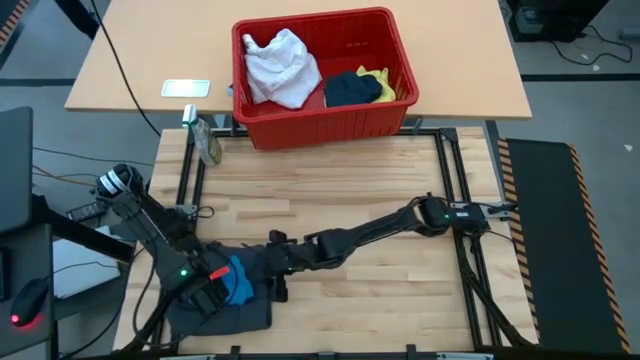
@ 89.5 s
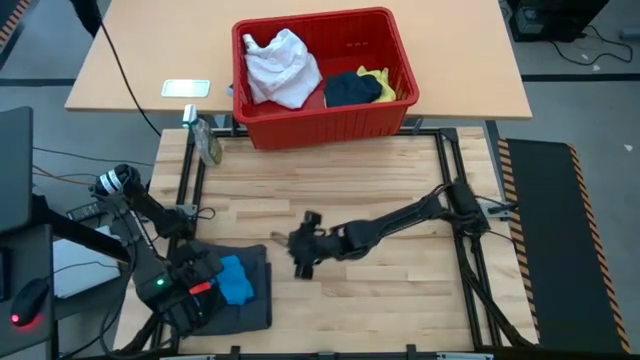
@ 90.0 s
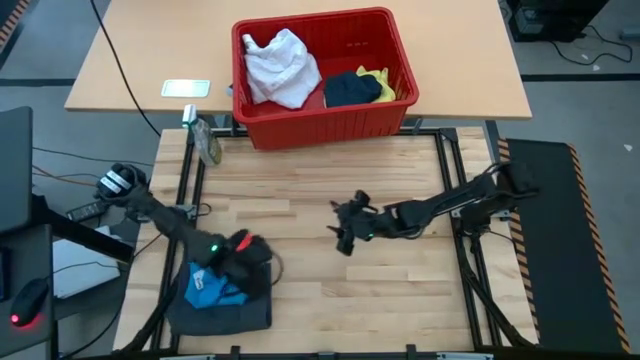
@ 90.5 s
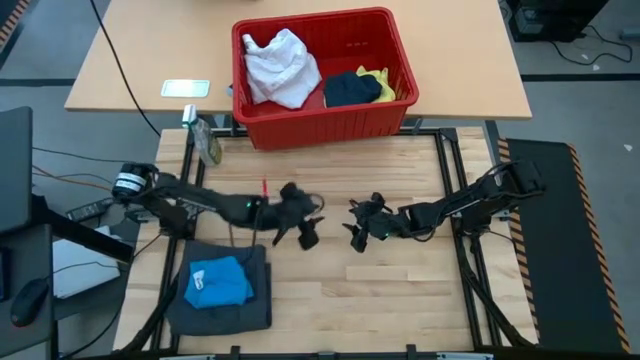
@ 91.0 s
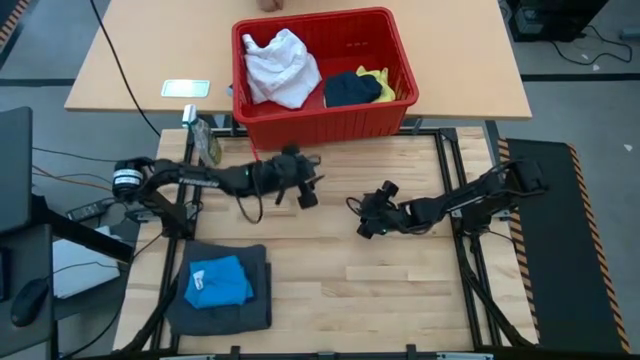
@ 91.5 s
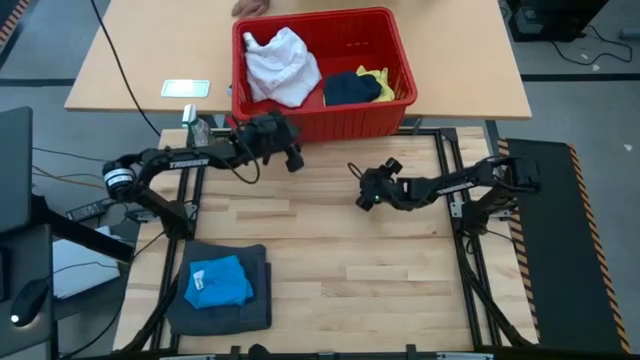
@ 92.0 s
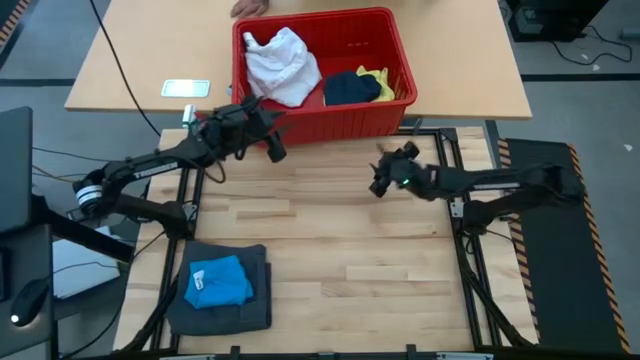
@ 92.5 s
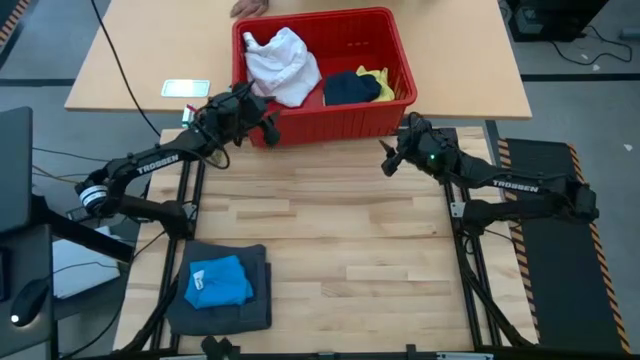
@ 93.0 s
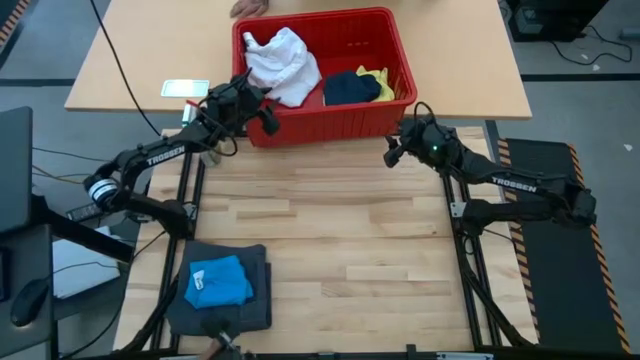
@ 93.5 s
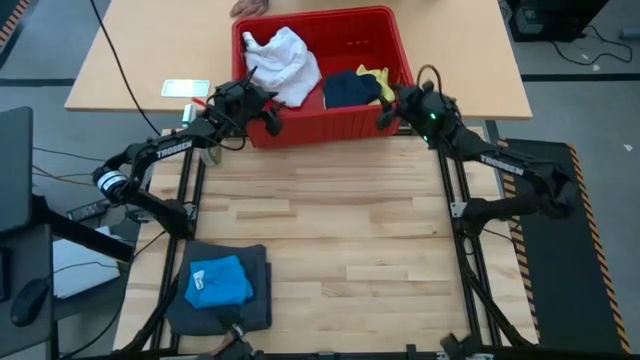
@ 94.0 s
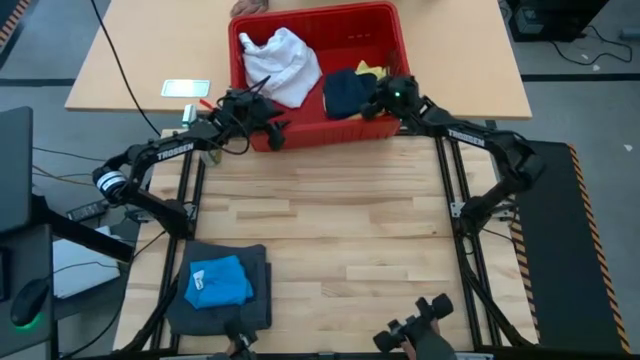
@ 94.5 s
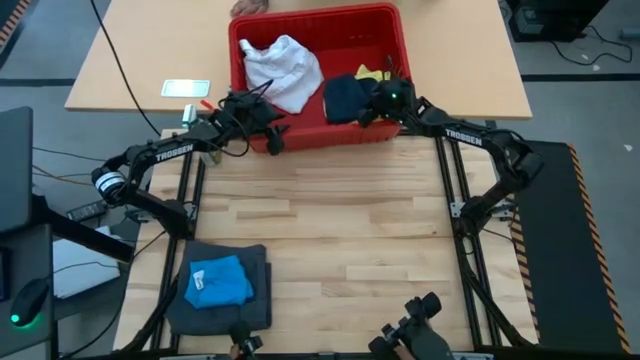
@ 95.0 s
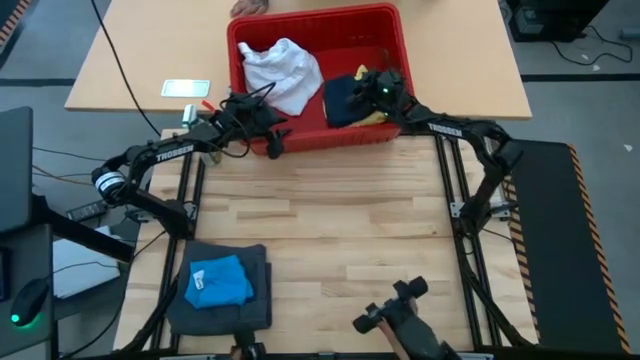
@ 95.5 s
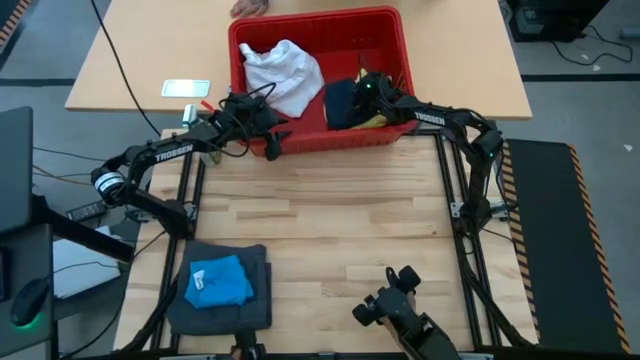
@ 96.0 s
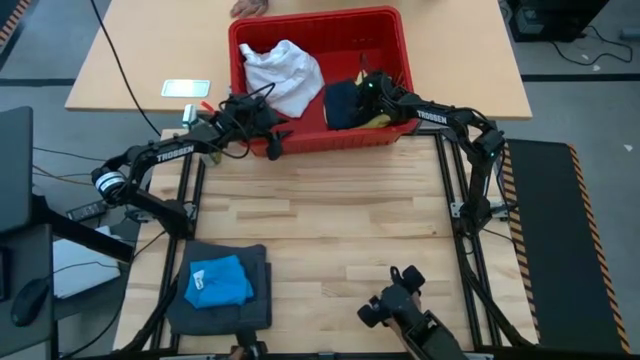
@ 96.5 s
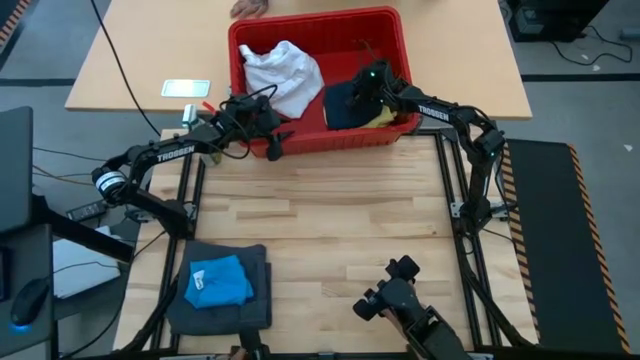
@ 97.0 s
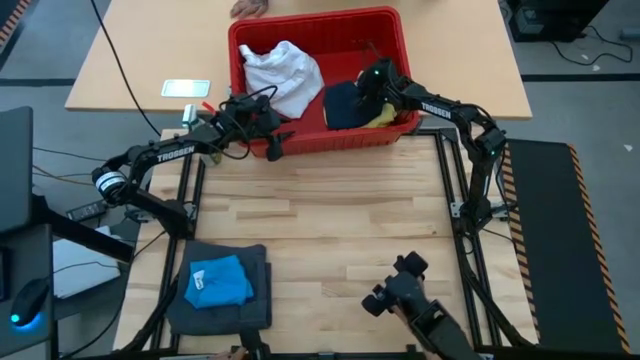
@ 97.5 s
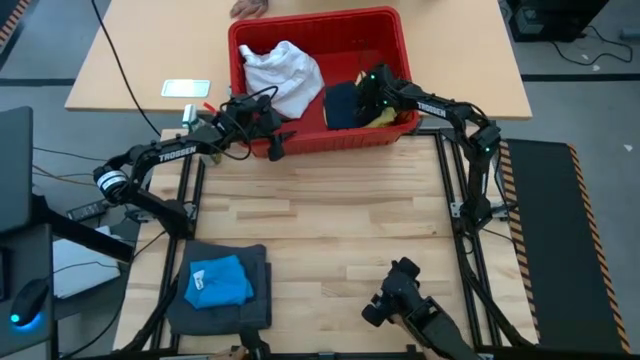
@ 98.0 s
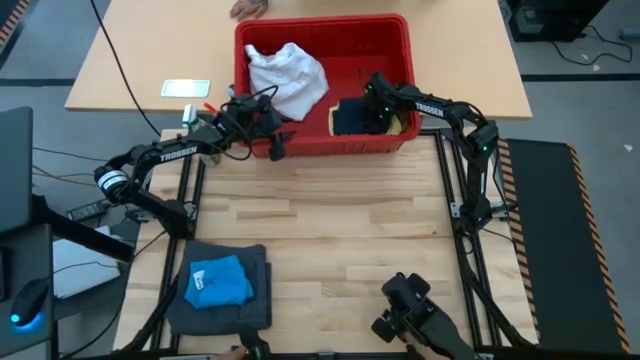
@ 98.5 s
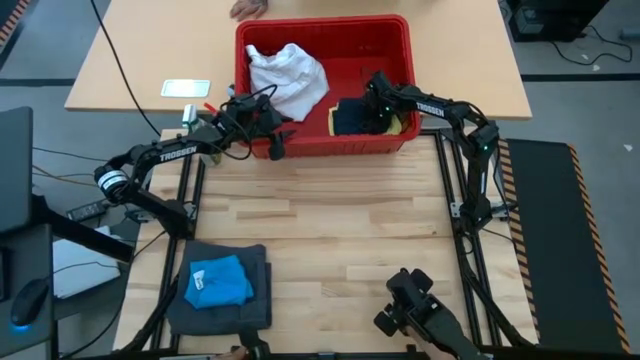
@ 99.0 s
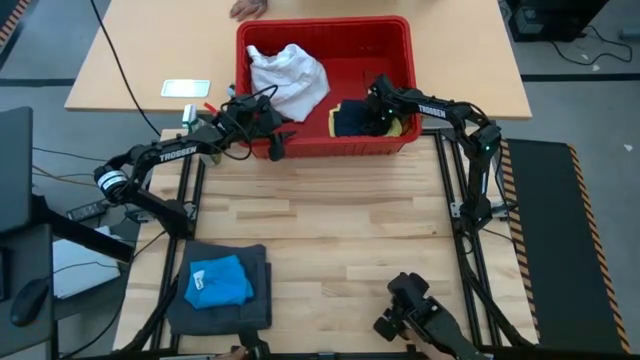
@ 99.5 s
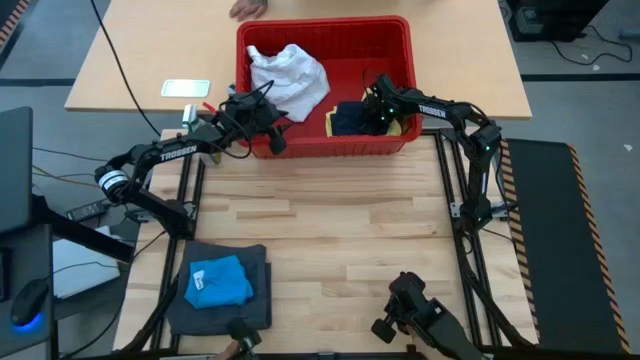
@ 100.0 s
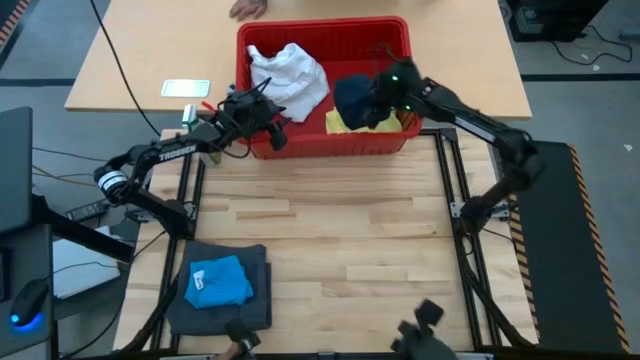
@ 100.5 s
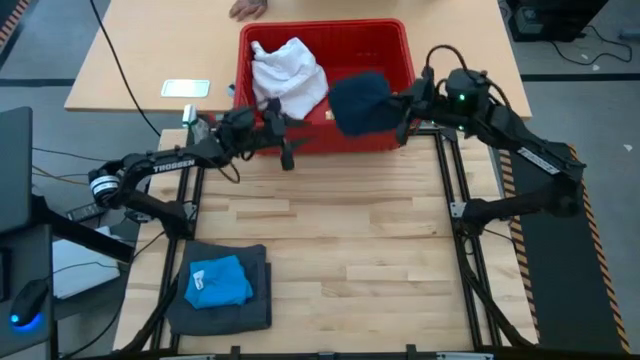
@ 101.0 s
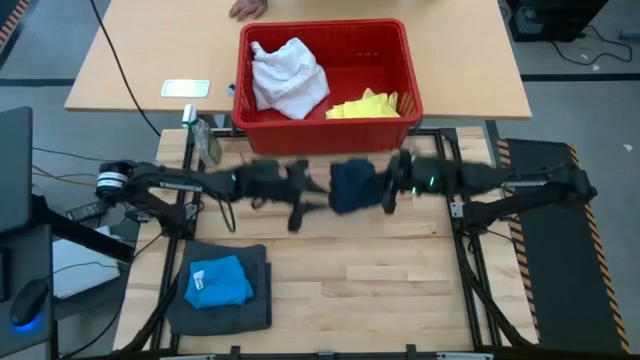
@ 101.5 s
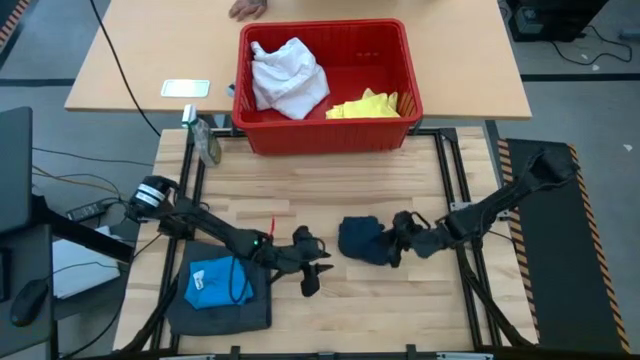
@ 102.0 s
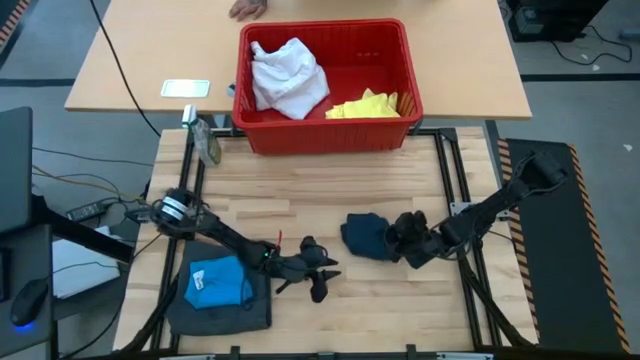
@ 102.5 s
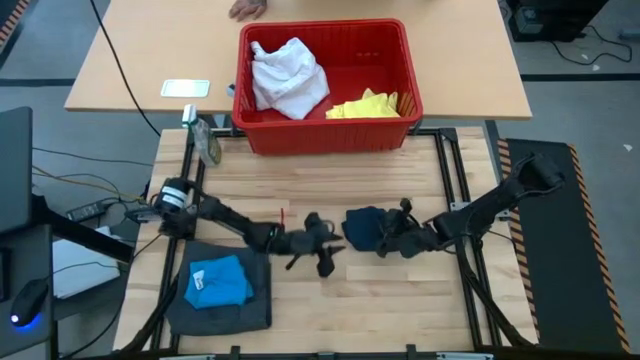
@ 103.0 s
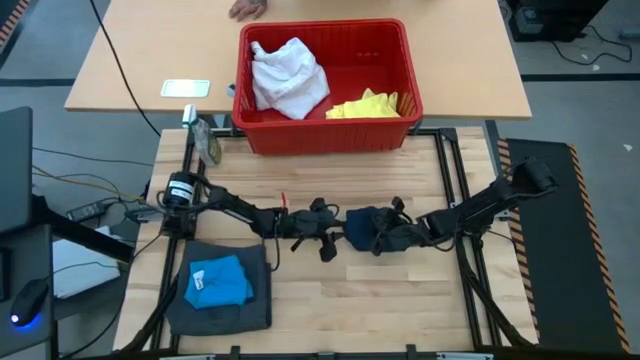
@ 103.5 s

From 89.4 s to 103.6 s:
Task: Fold laundry
Remove the dark blue shorts from the red bin

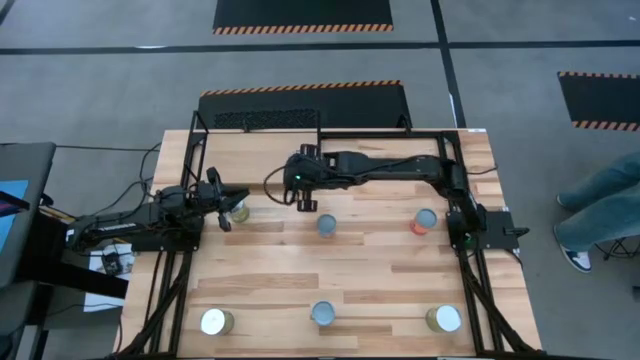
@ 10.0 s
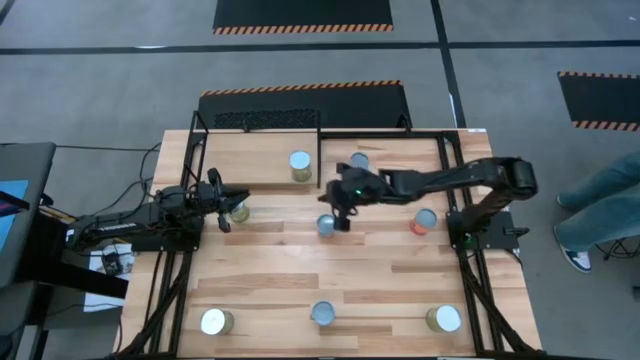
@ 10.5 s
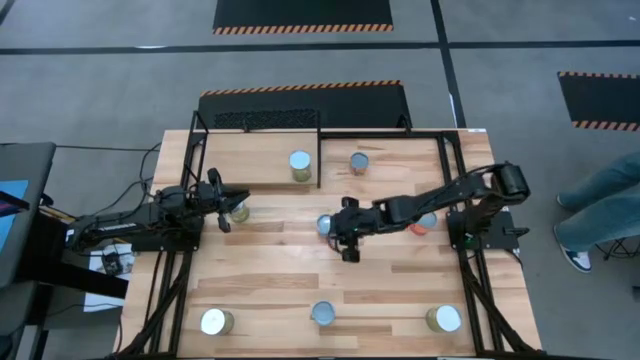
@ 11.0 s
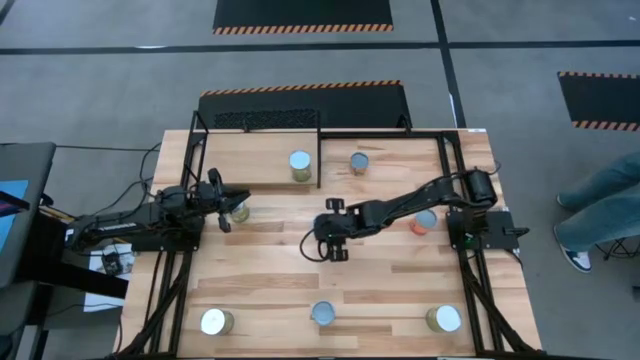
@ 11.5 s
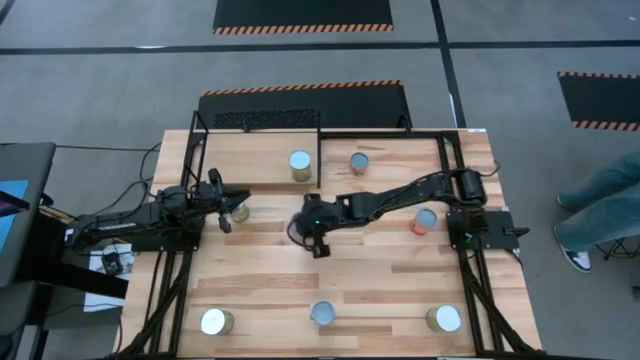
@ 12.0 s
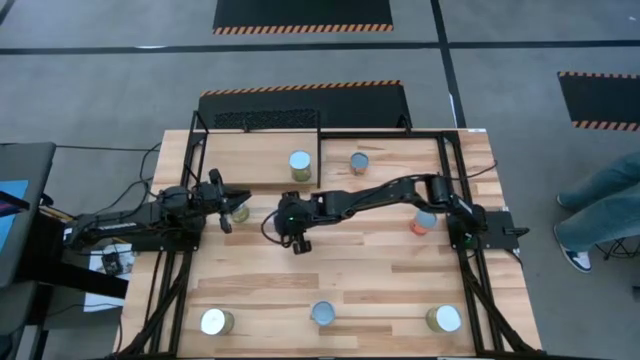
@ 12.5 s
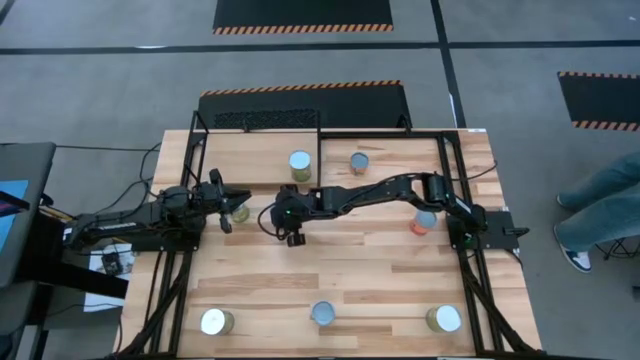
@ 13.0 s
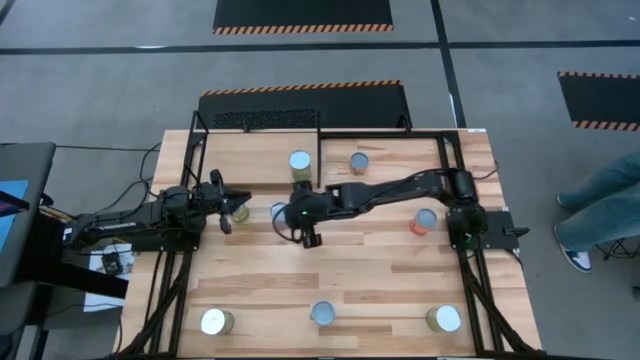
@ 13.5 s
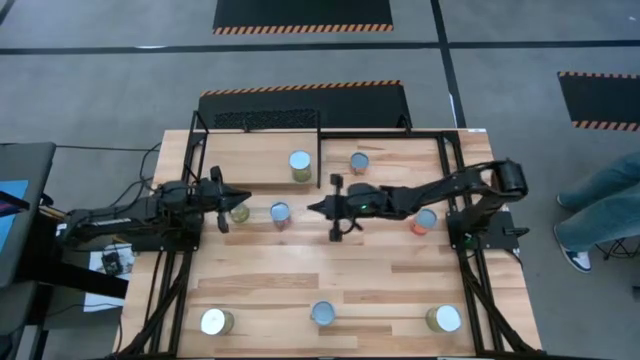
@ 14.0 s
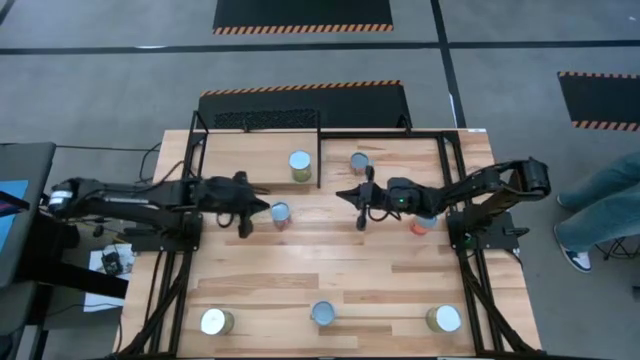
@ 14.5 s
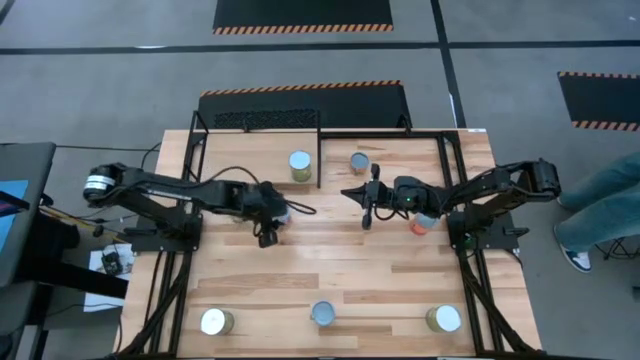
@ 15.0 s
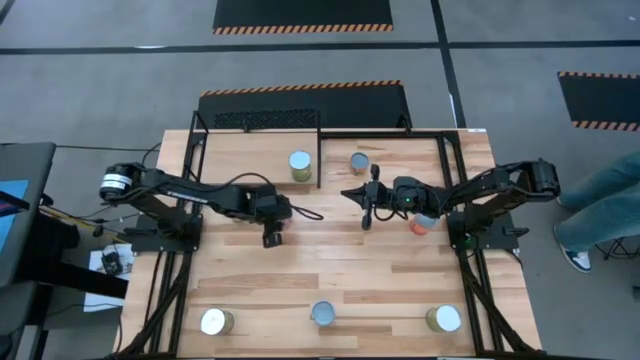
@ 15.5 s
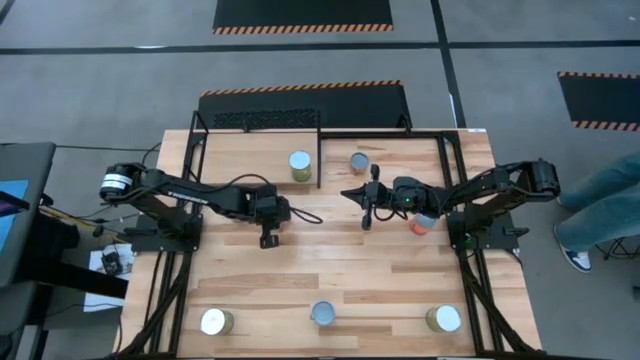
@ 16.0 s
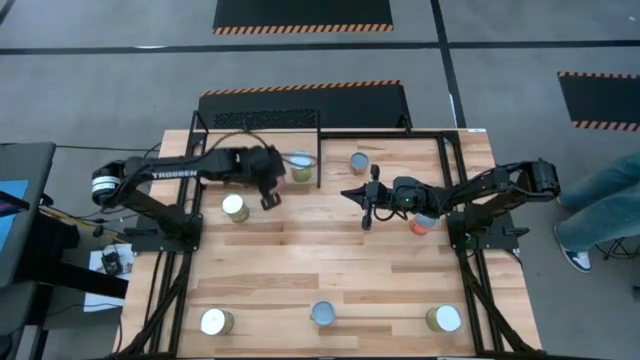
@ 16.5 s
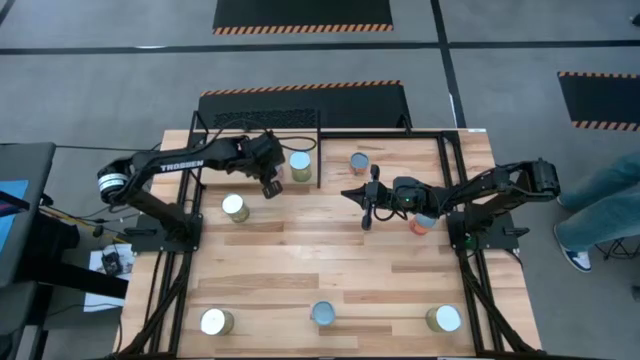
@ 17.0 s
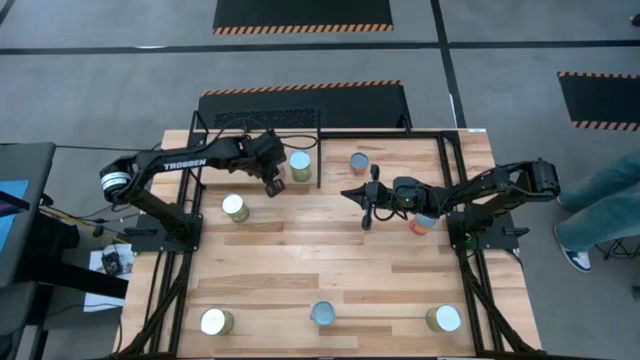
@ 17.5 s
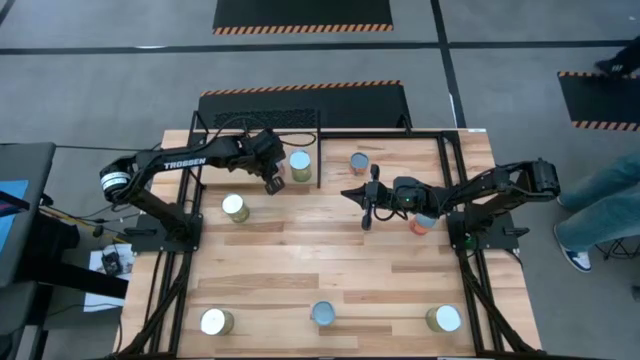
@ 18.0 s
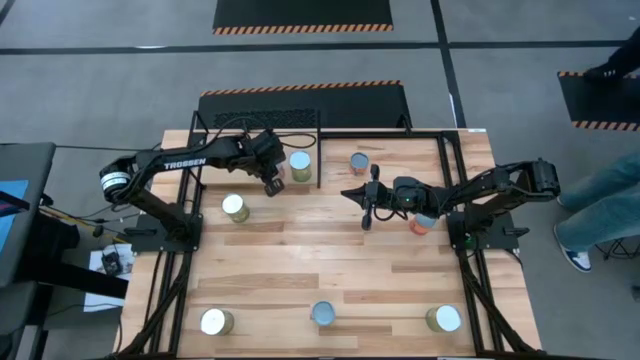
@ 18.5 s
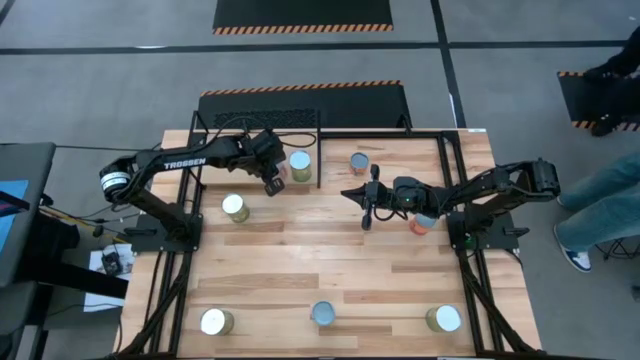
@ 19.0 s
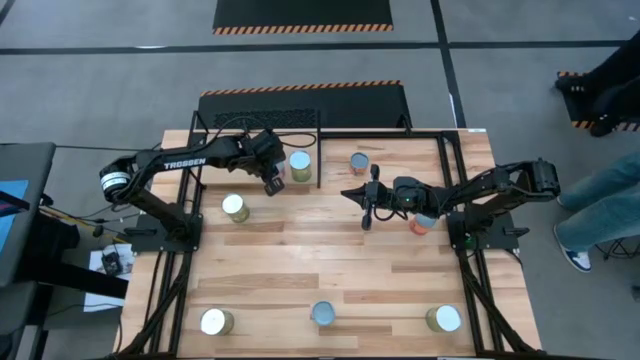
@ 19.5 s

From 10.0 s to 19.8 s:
Task: Pick and place cans onto a shelf
Put the canned corn on the shelf
